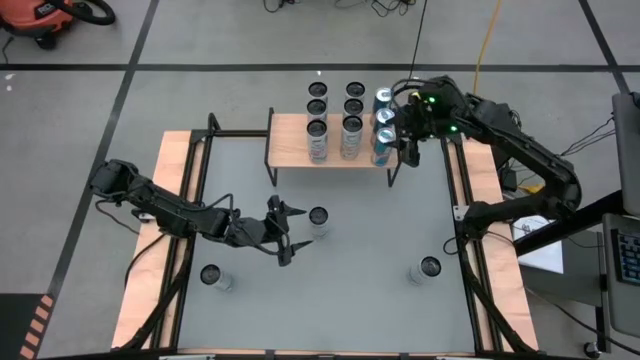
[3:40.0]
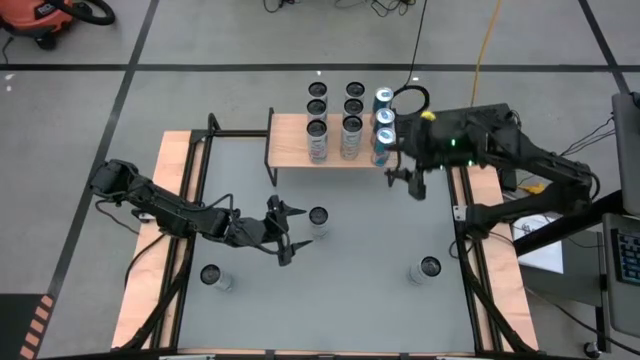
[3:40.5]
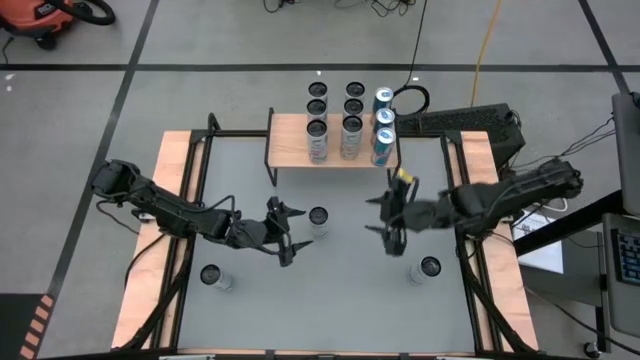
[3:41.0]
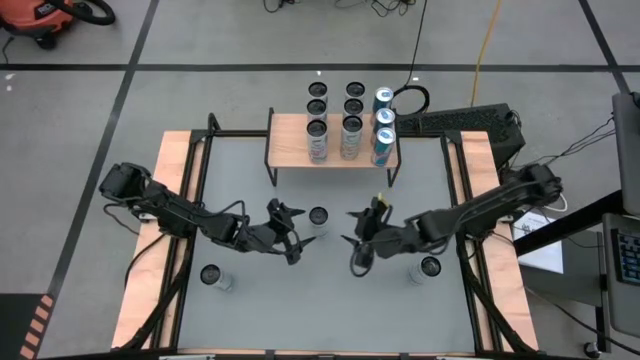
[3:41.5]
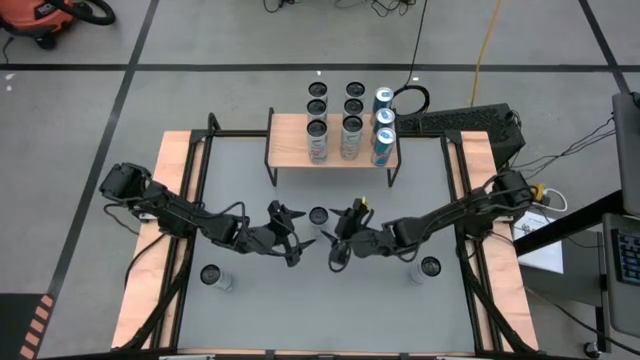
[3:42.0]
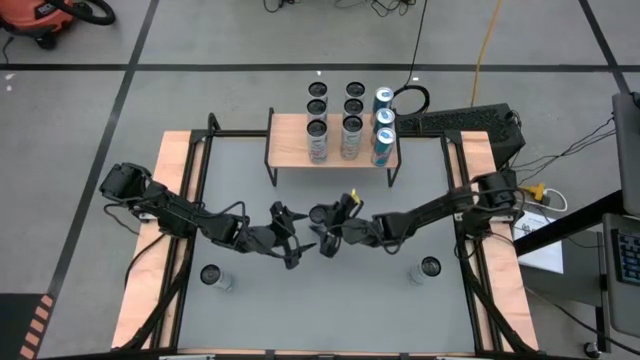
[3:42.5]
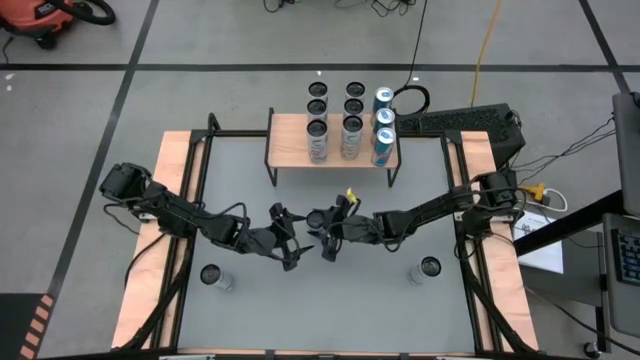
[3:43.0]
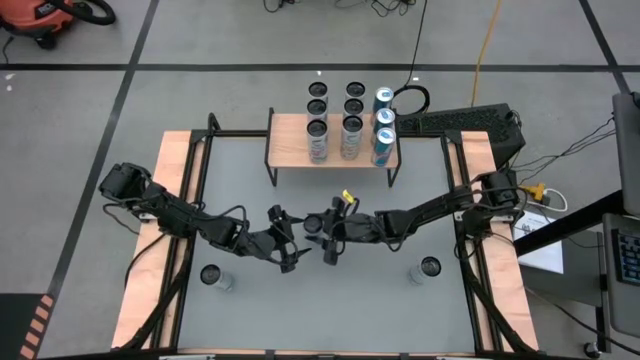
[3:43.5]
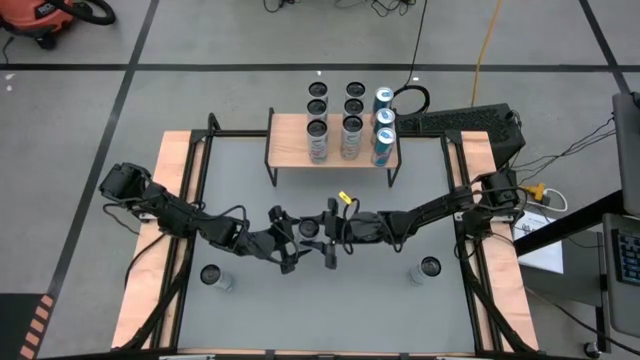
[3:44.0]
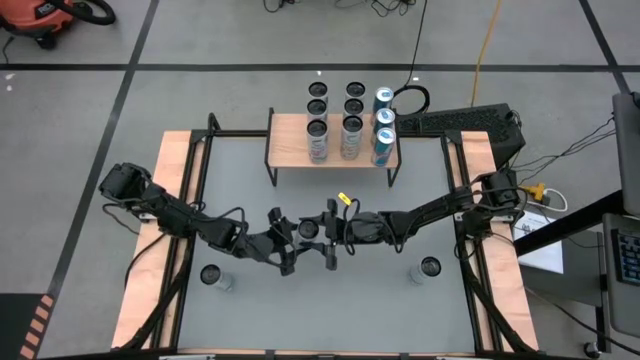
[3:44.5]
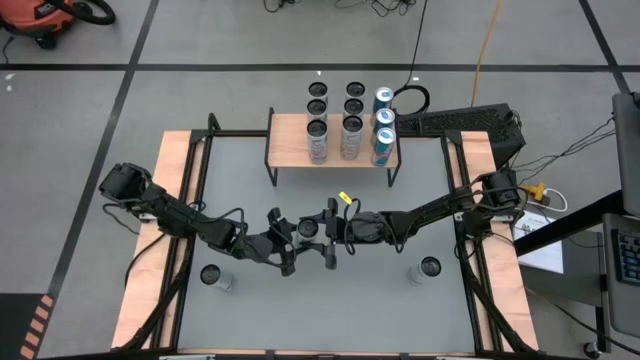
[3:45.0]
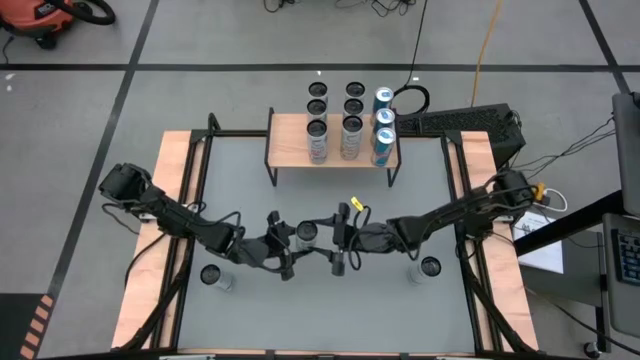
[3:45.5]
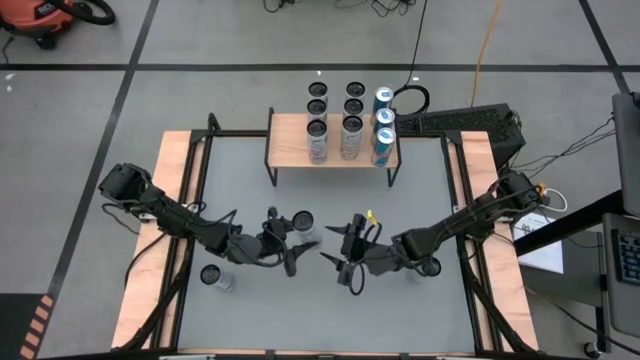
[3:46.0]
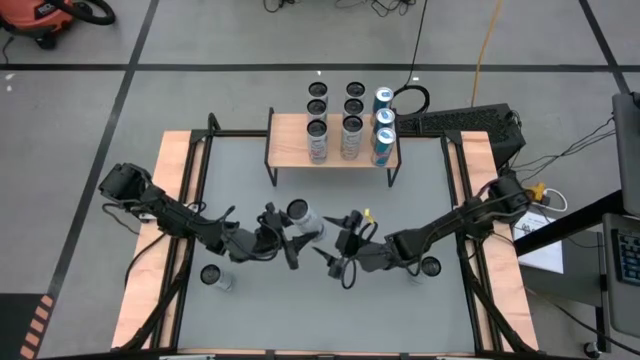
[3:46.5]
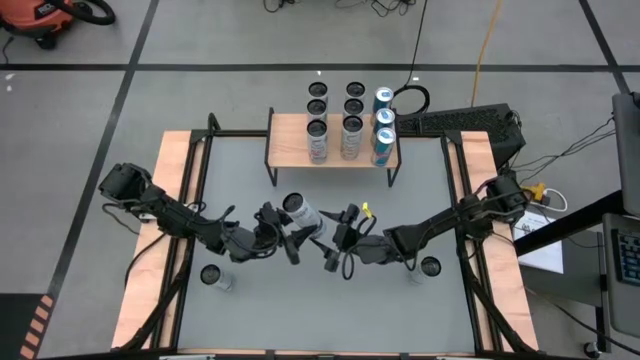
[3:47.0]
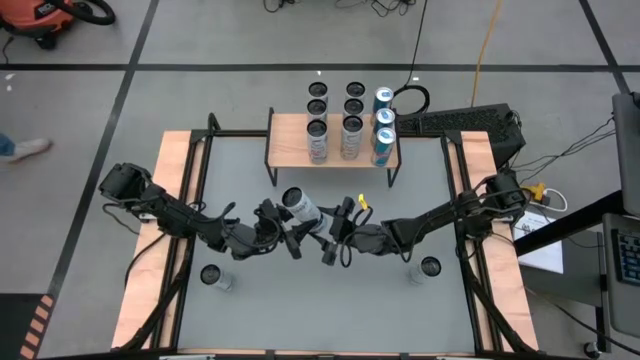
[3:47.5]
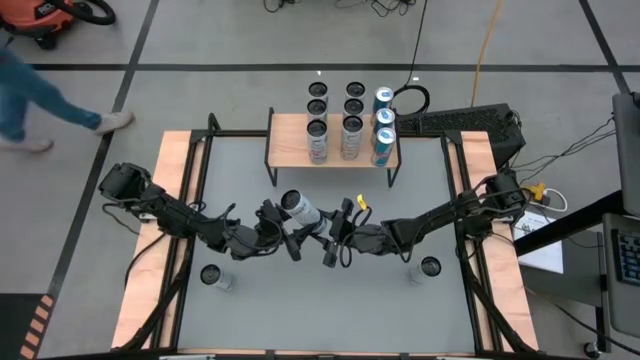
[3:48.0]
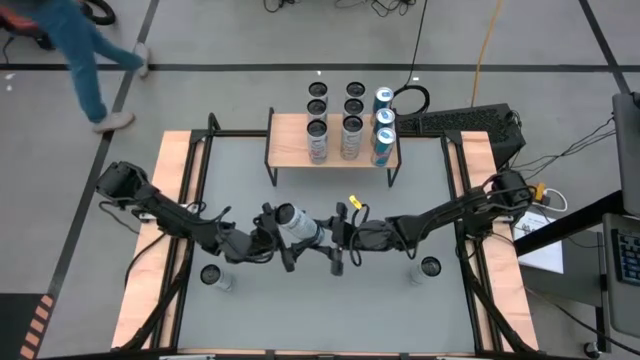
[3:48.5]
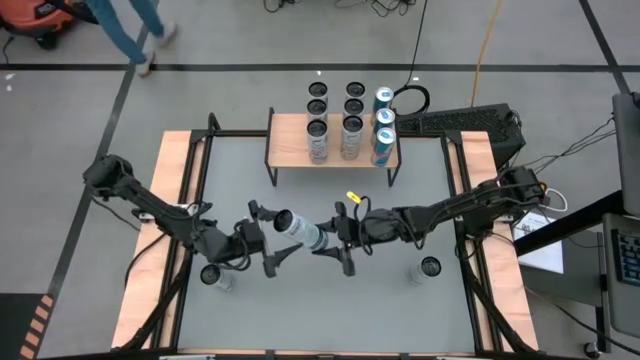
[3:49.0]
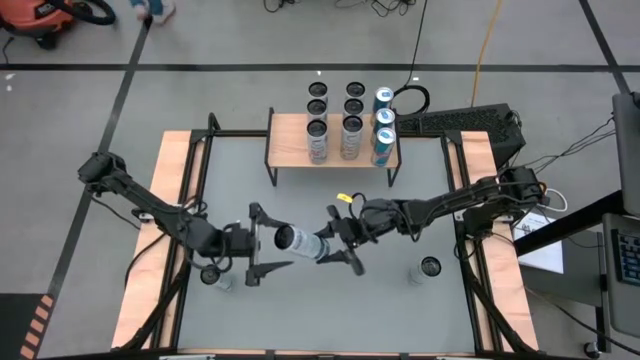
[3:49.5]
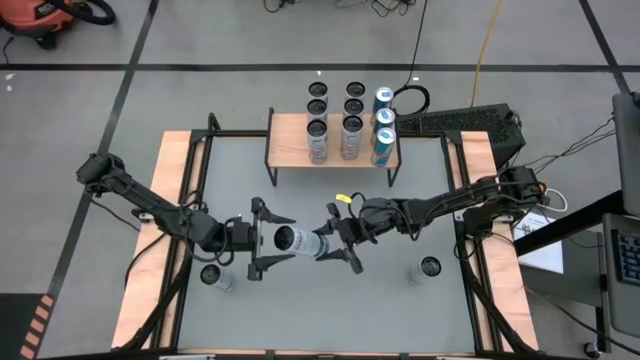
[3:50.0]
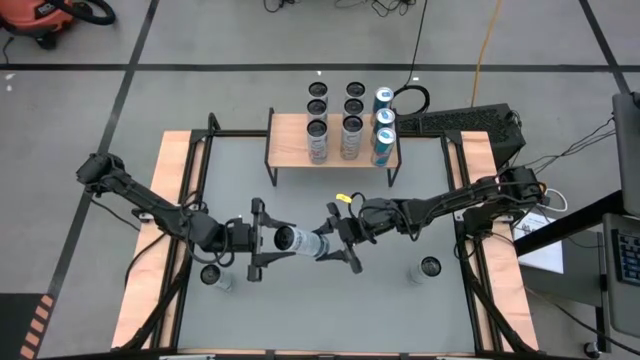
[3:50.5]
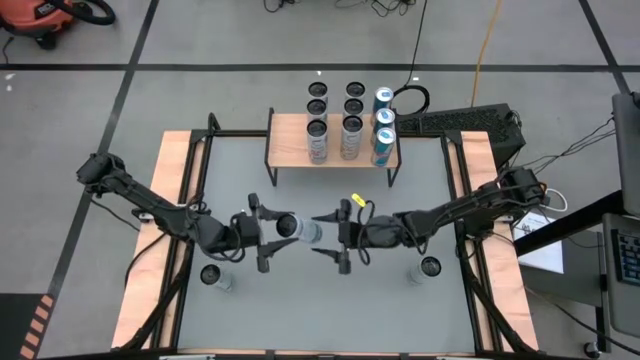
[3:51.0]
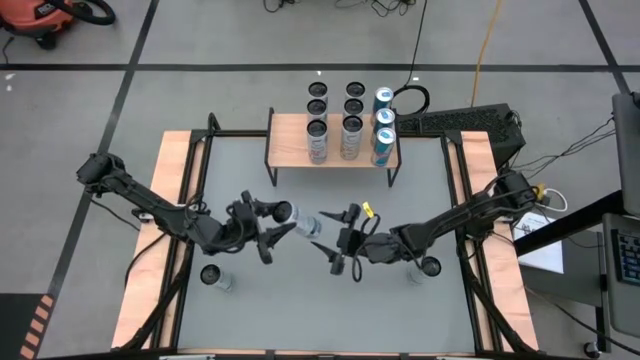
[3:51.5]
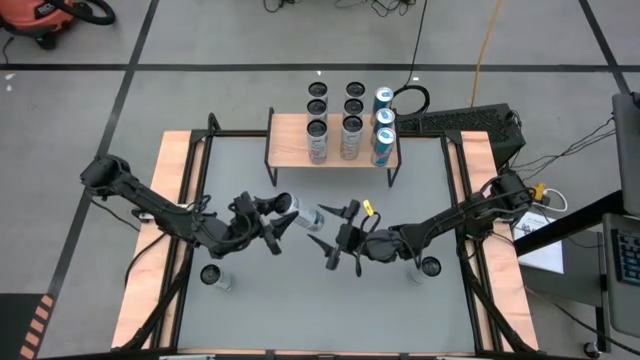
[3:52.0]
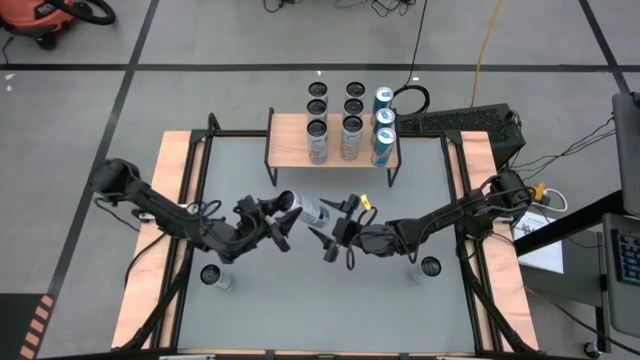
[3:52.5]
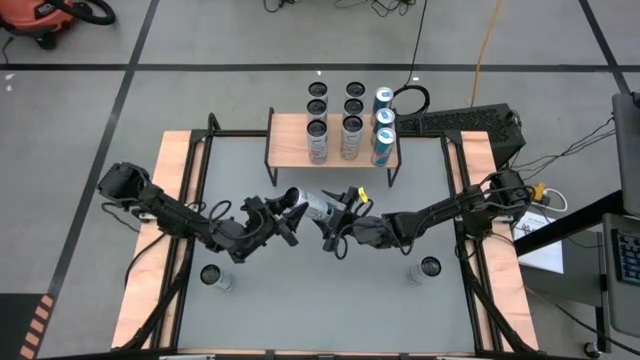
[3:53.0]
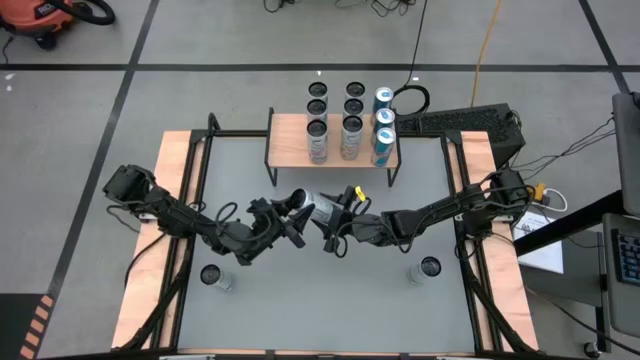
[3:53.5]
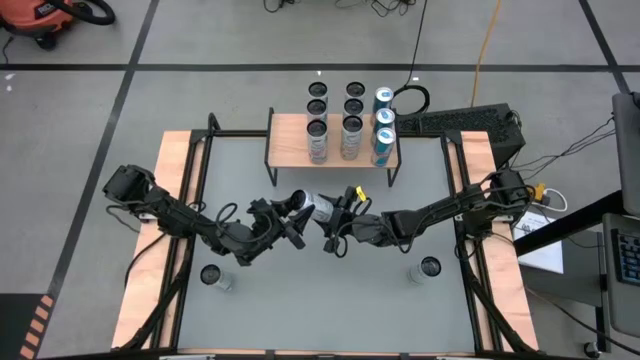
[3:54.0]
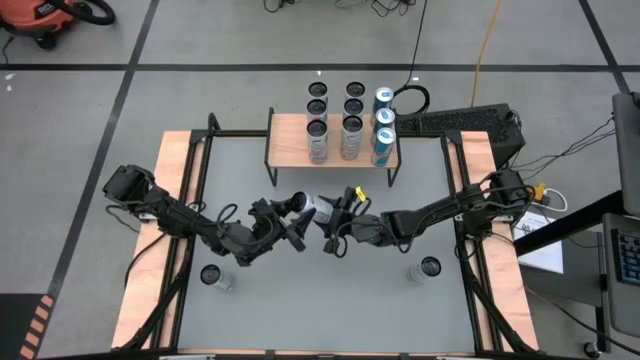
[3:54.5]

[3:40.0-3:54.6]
Task: Place canned beverage on shelf
Put the top white blue soda can on the shelf

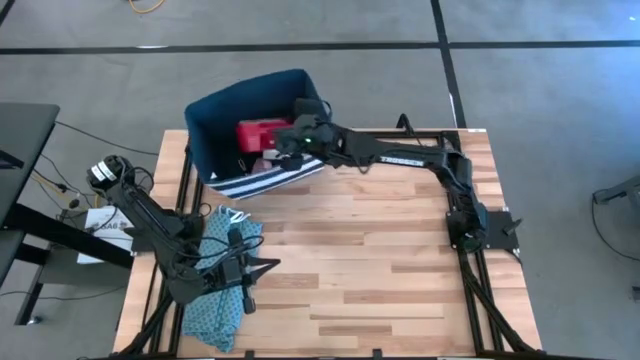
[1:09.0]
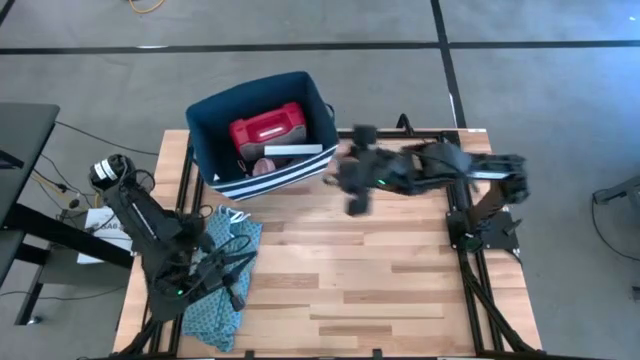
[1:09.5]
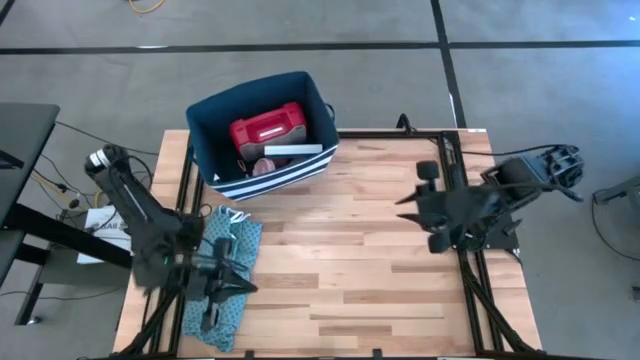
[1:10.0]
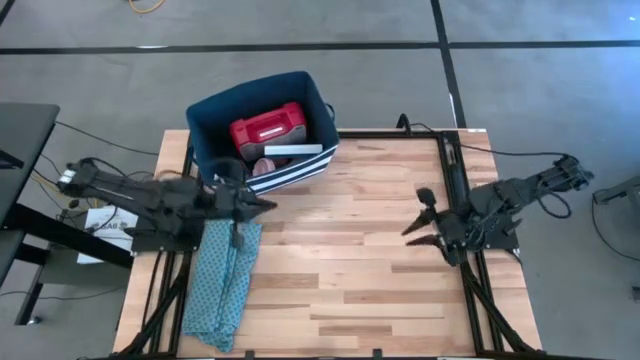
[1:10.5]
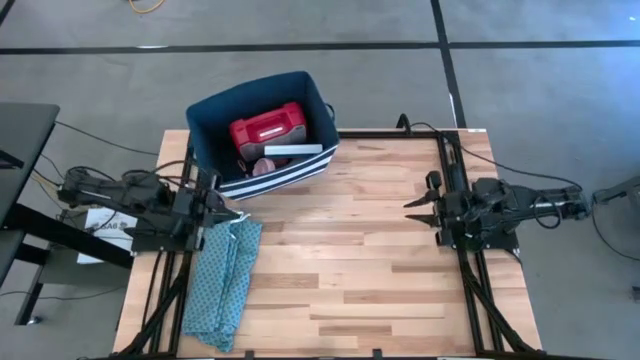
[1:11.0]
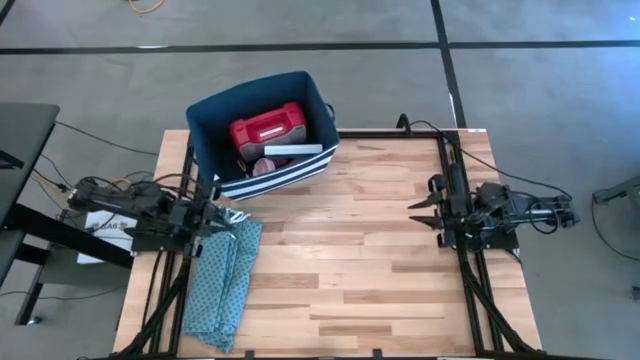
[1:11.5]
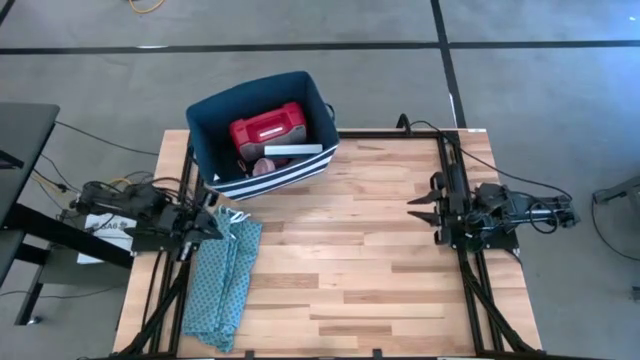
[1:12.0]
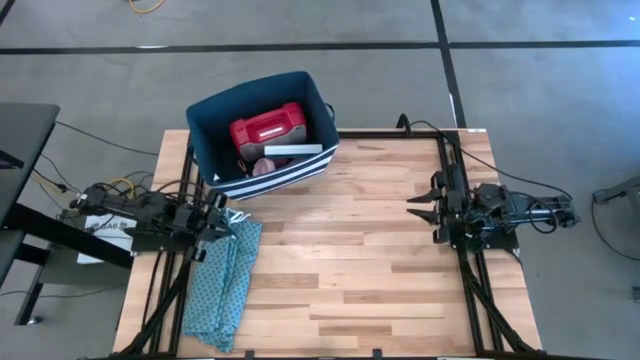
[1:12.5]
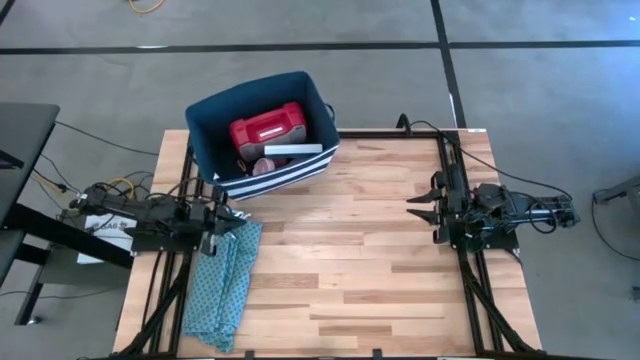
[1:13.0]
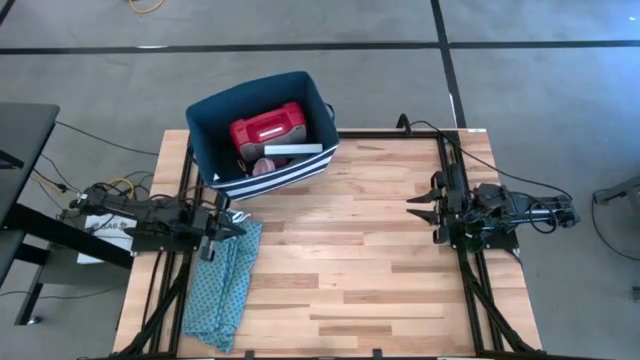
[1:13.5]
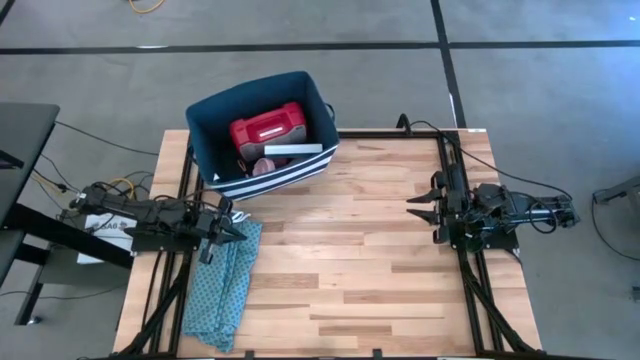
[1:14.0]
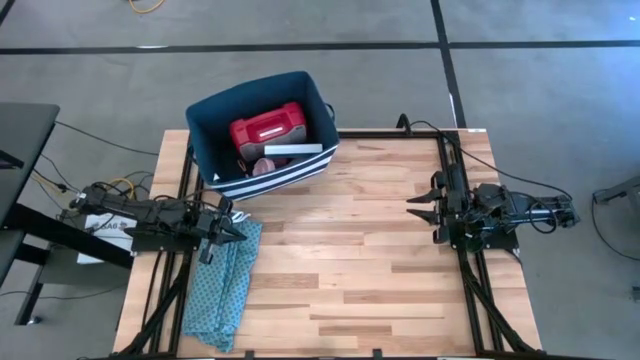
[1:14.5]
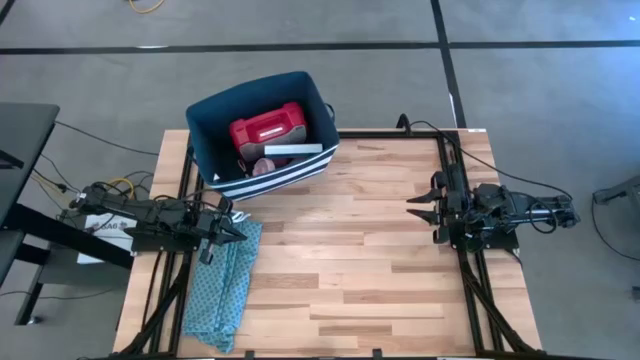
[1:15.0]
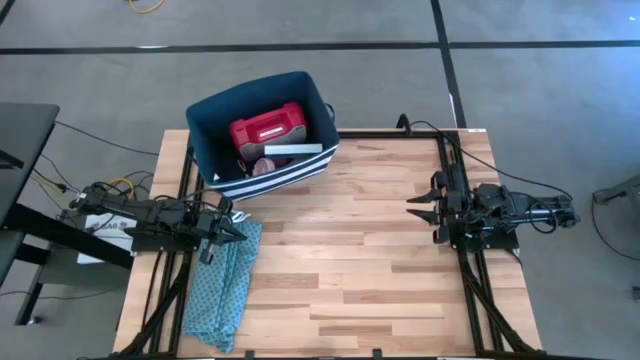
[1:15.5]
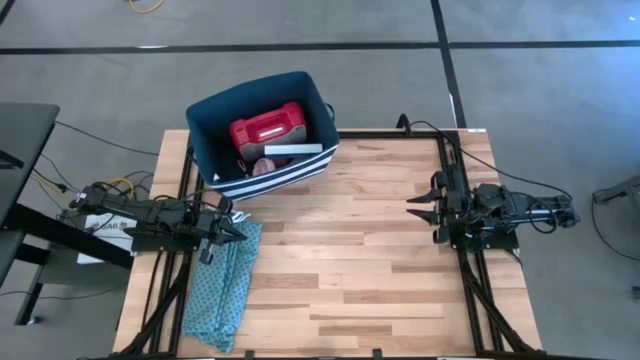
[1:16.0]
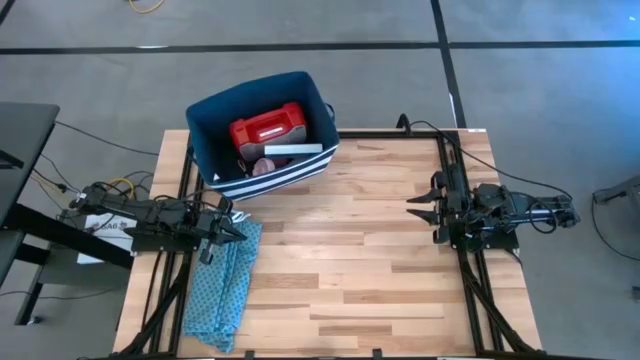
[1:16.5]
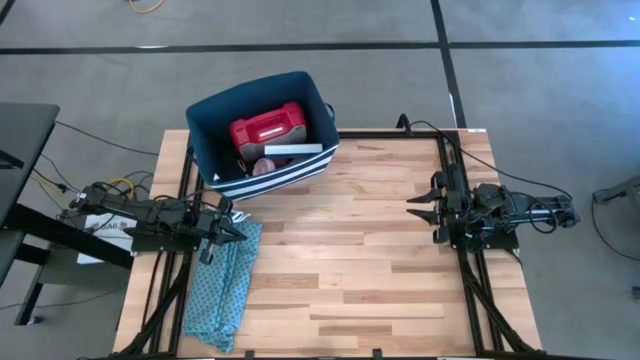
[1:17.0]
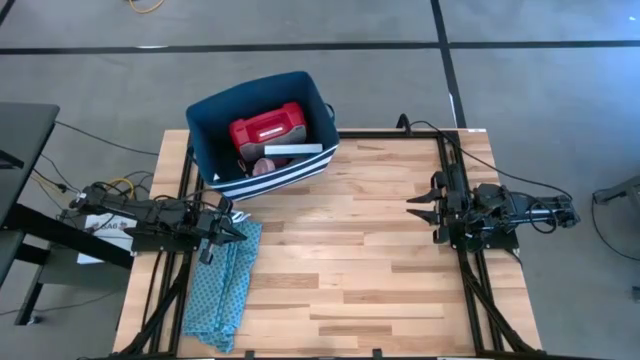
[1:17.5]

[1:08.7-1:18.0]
Task: Pick & place medical supplies in basket/bin
Return to Home Position
